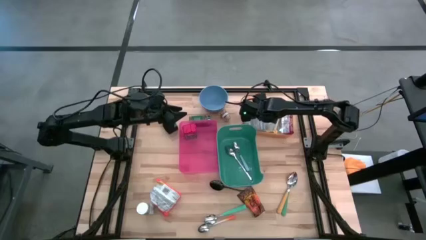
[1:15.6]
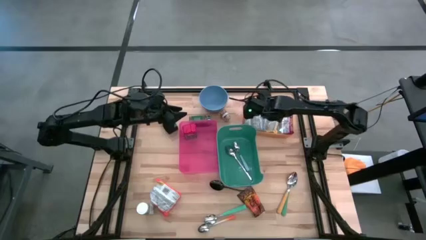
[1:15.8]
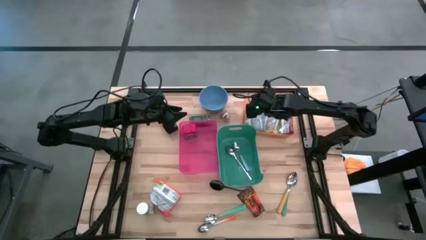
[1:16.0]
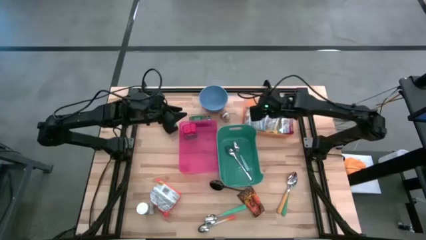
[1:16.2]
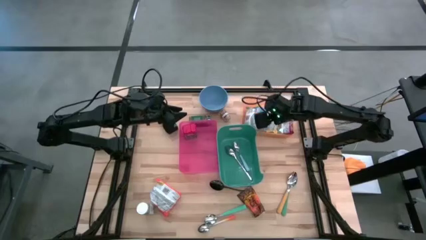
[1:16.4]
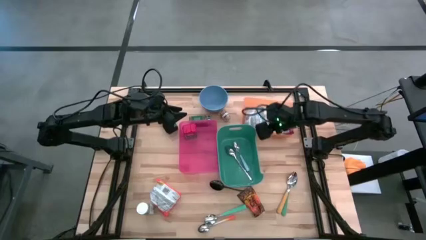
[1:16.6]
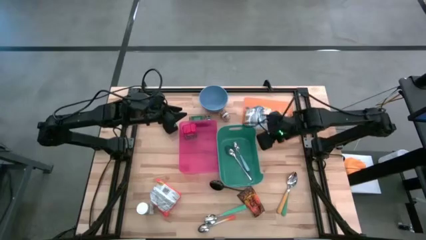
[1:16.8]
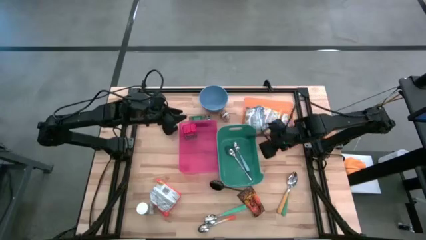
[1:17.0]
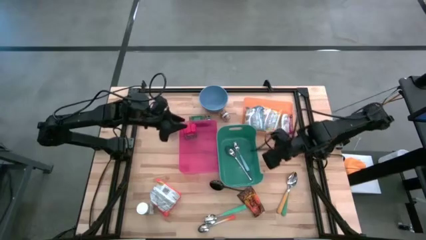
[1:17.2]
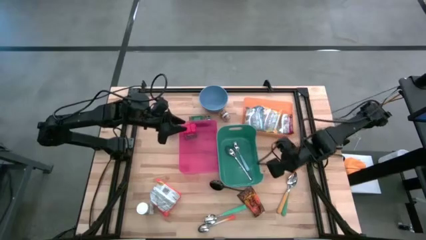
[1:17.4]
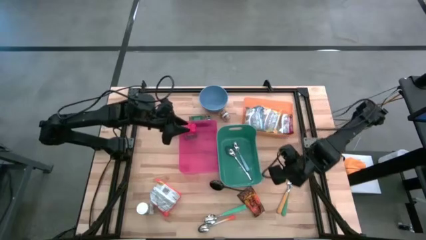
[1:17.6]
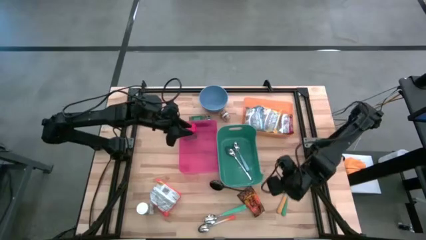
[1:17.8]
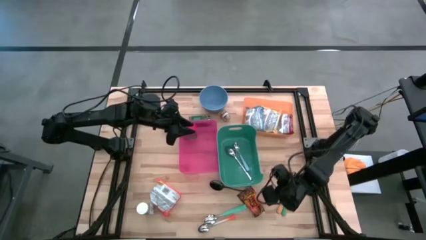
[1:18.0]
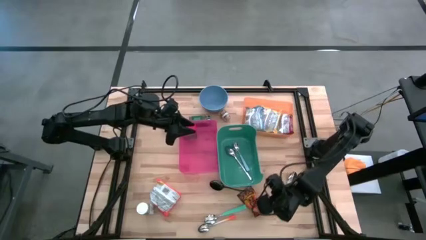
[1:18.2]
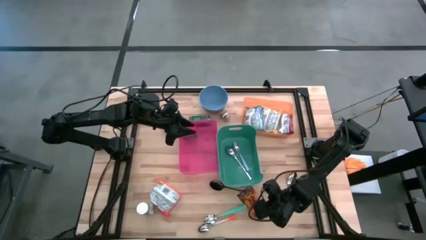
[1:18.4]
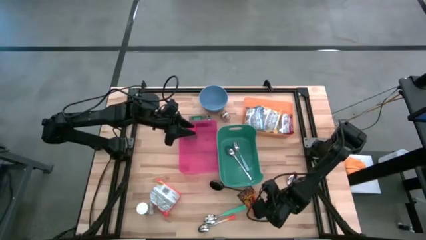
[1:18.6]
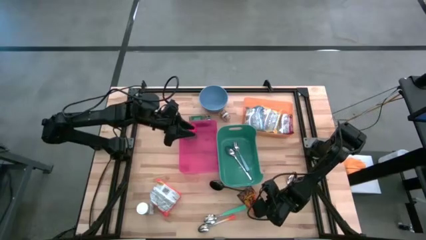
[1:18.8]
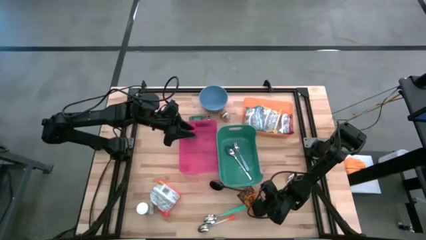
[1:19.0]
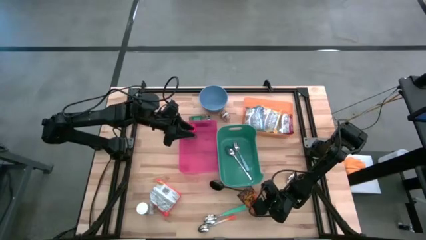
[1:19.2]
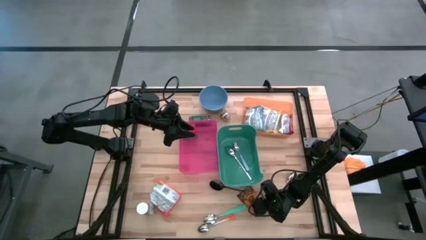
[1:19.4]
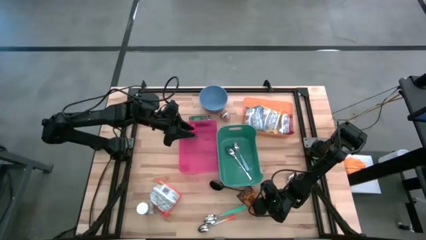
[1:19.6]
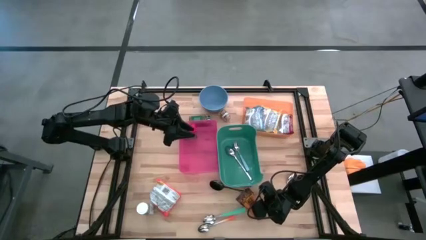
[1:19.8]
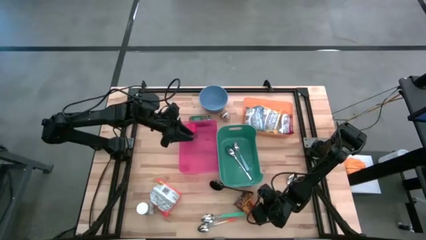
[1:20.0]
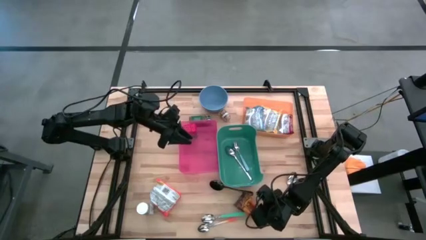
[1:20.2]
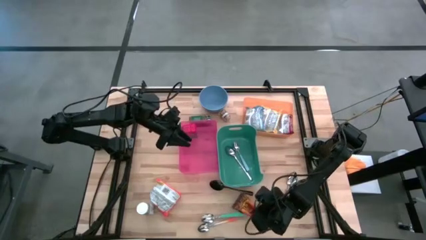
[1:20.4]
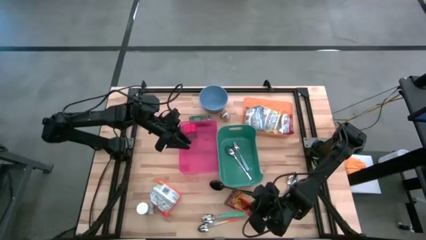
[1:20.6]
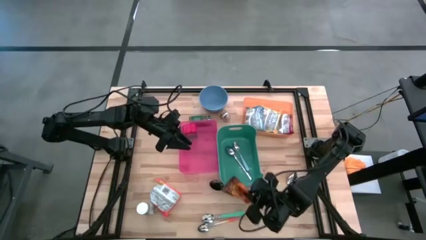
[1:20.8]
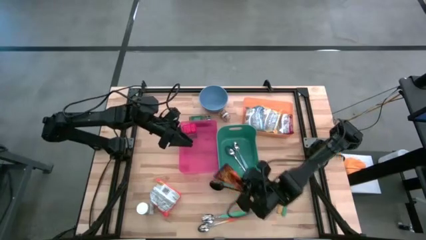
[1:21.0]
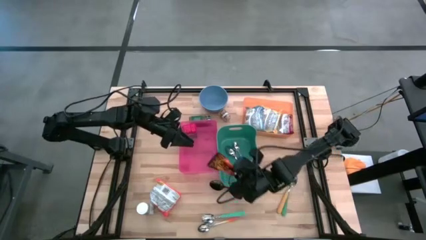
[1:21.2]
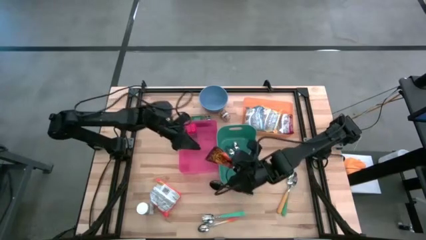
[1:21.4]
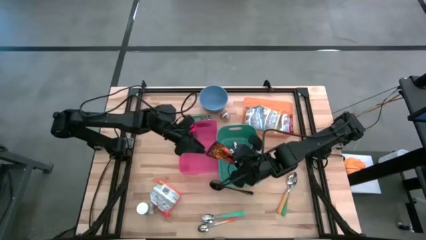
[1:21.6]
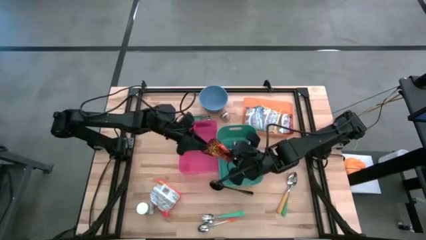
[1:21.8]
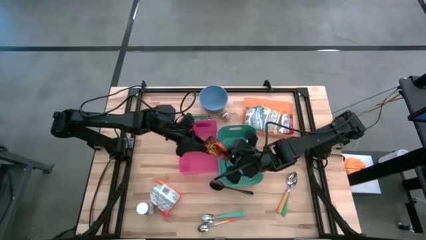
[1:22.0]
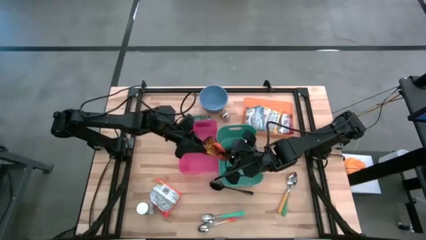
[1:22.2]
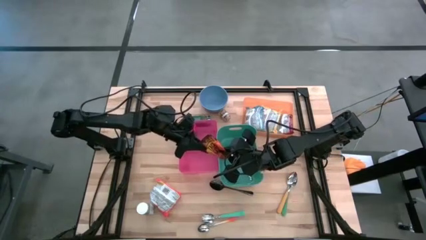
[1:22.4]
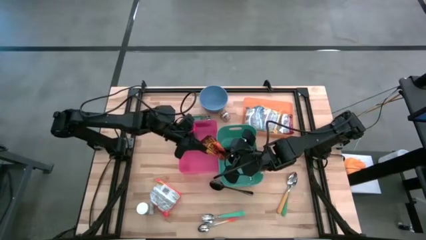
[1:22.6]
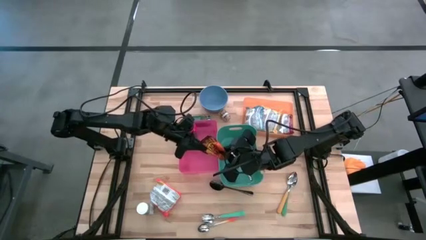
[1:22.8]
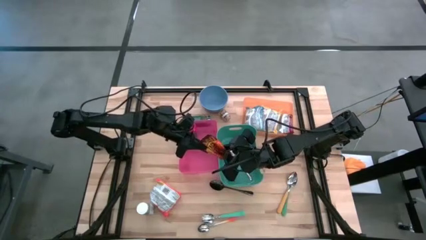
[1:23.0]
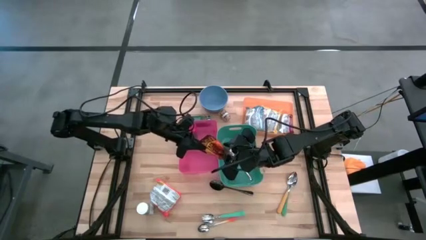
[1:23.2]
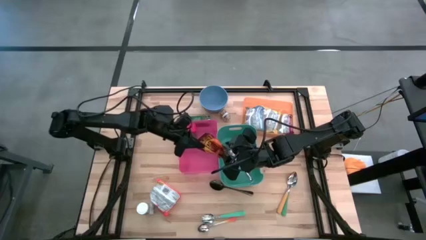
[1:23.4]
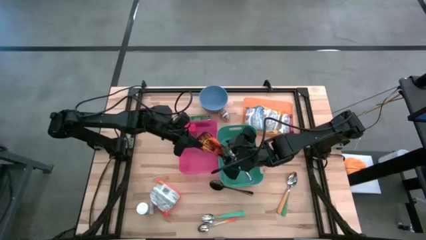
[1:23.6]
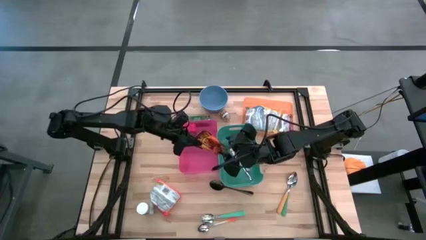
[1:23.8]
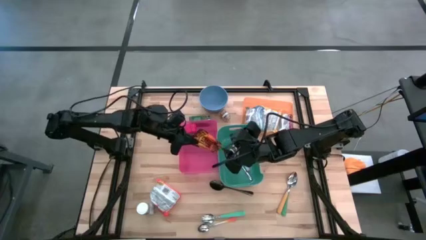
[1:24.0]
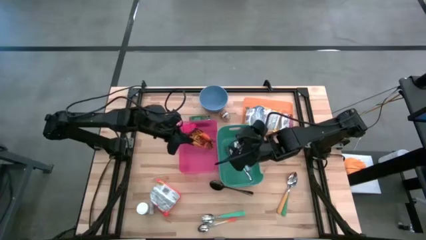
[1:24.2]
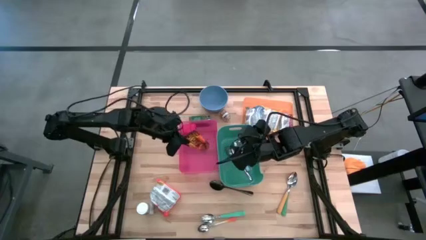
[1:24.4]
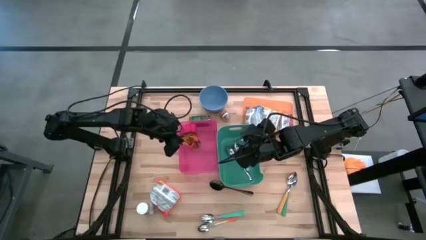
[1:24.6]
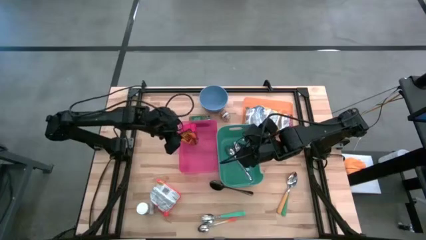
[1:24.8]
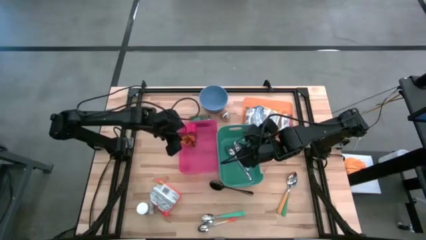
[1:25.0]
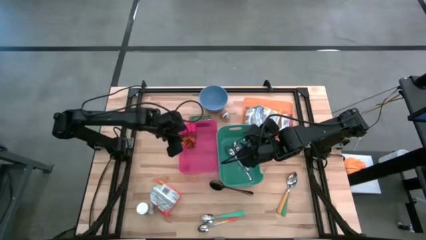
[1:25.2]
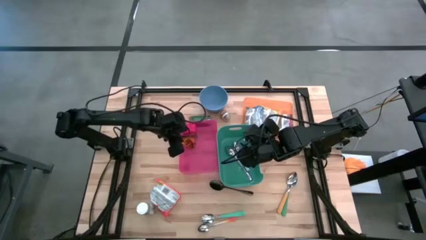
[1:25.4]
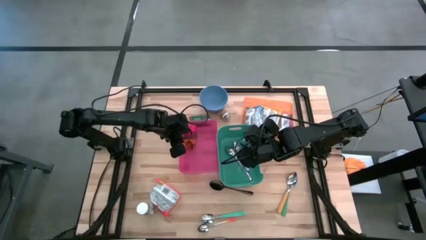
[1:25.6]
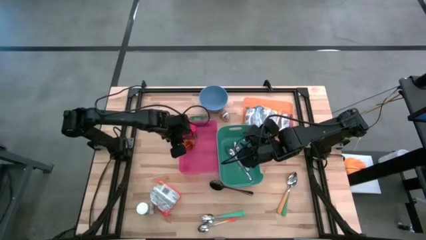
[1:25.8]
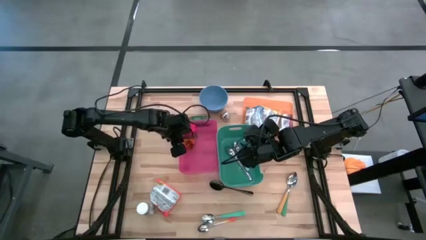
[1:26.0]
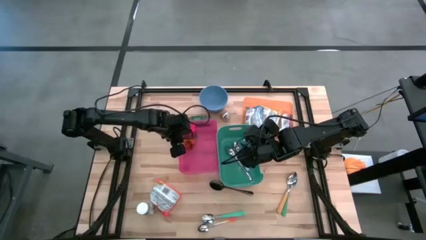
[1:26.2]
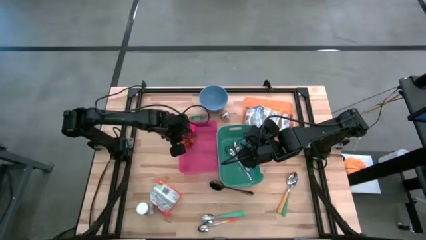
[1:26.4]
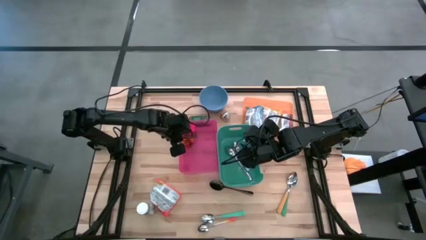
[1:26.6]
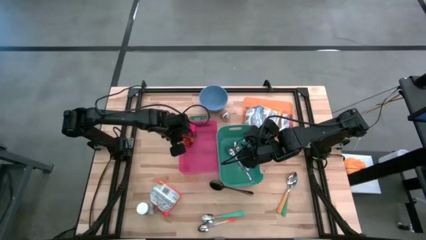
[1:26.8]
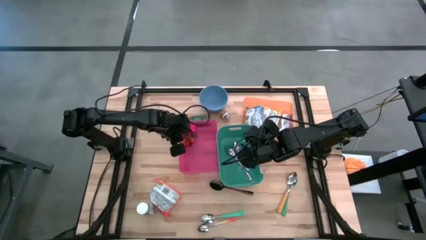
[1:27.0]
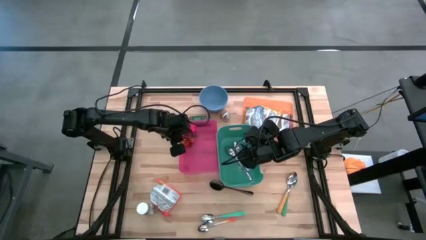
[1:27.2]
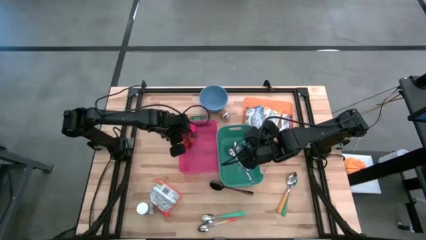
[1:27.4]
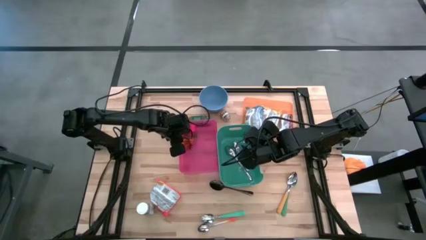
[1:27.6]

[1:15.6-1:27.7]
Put the orange spice bag into the red bin

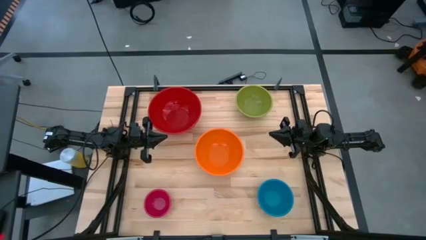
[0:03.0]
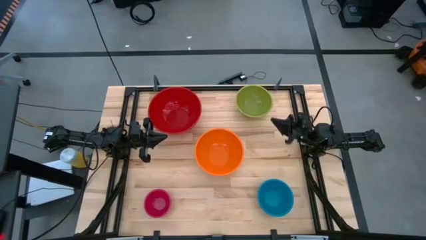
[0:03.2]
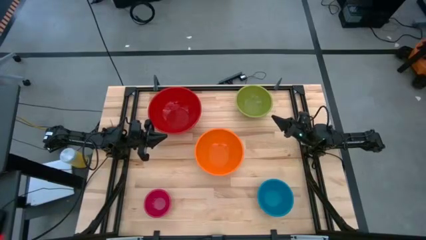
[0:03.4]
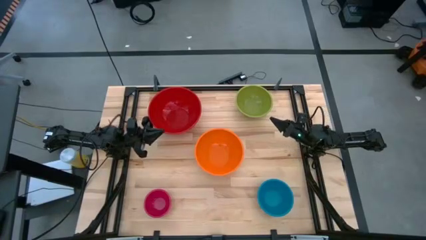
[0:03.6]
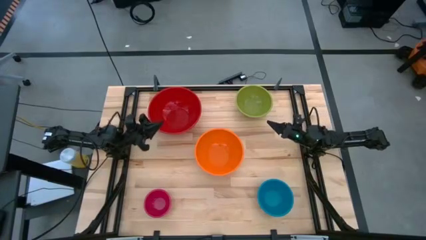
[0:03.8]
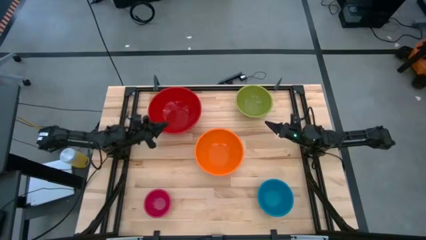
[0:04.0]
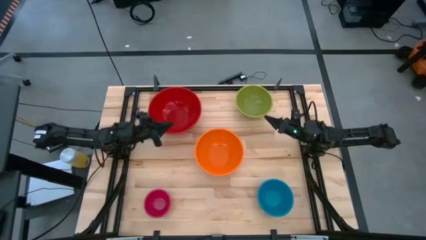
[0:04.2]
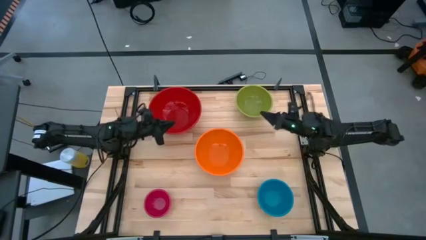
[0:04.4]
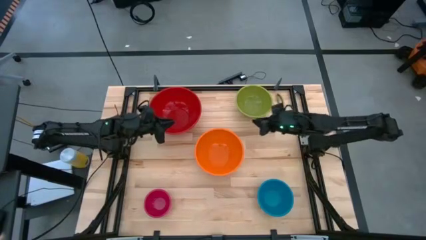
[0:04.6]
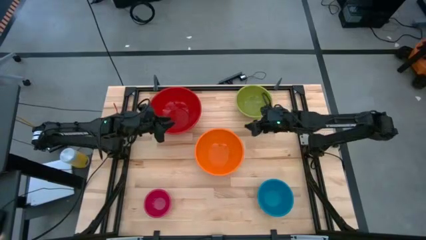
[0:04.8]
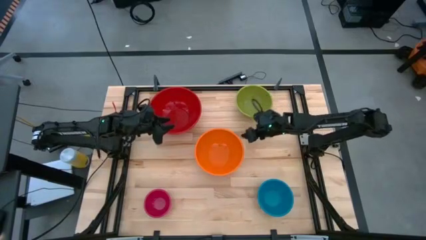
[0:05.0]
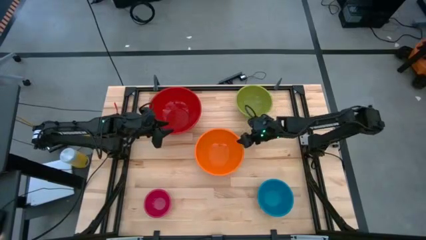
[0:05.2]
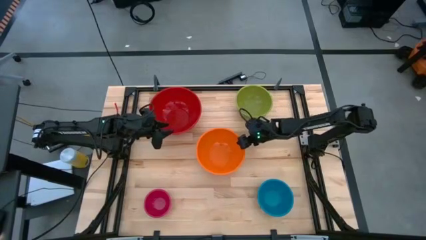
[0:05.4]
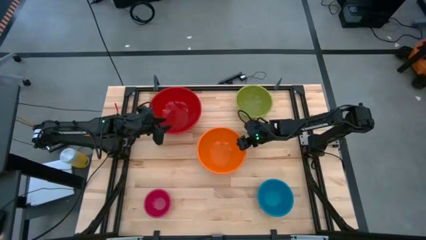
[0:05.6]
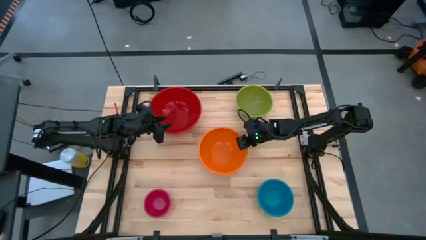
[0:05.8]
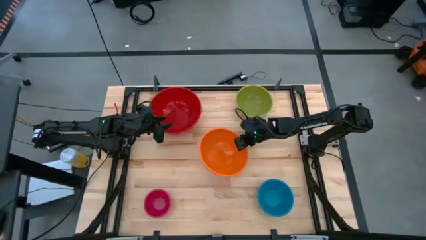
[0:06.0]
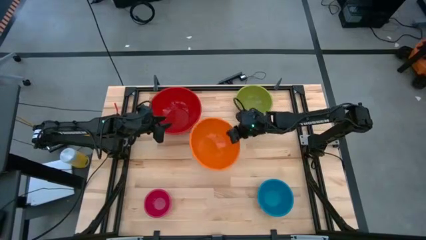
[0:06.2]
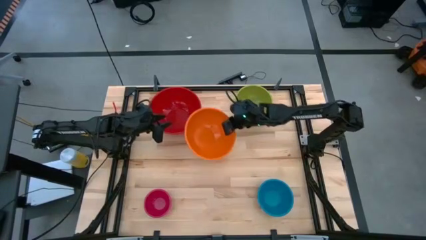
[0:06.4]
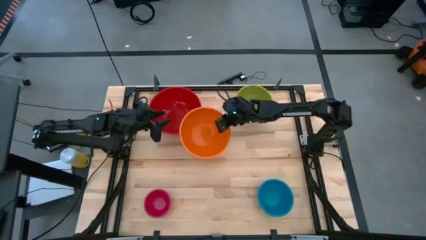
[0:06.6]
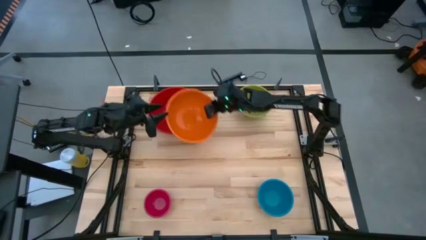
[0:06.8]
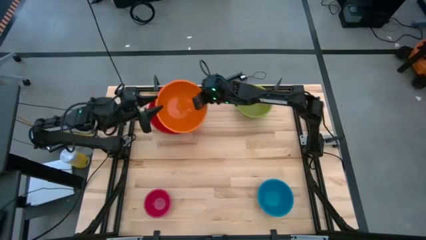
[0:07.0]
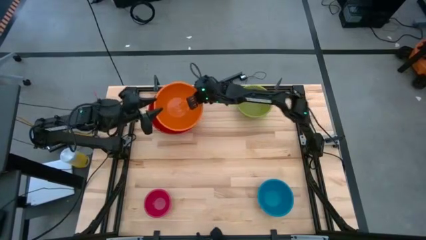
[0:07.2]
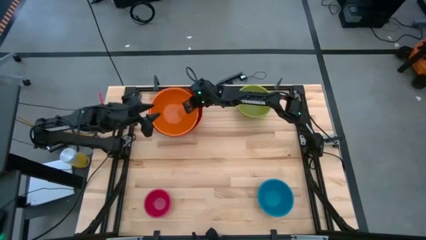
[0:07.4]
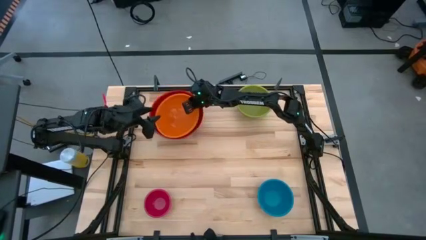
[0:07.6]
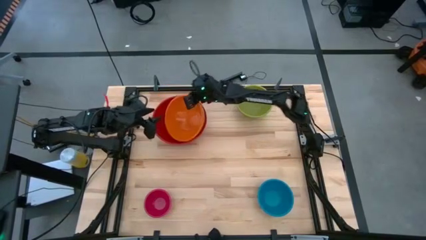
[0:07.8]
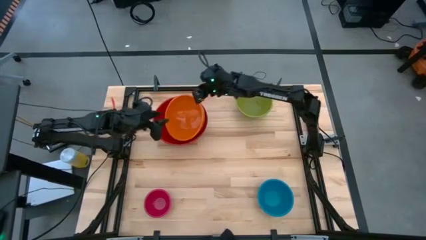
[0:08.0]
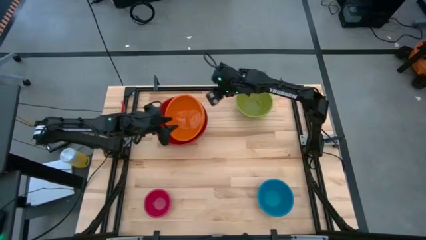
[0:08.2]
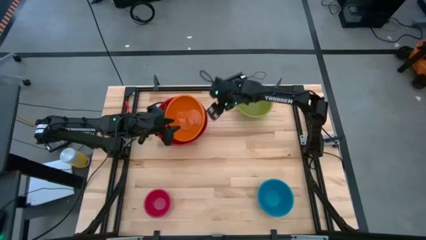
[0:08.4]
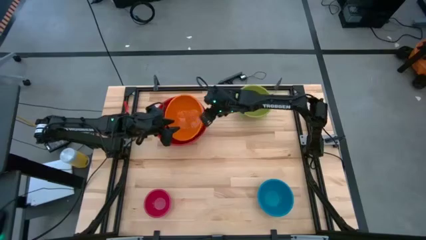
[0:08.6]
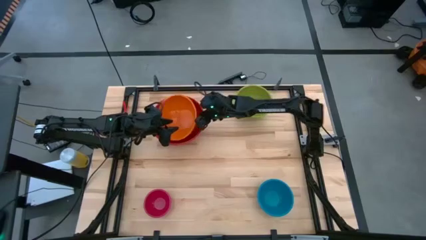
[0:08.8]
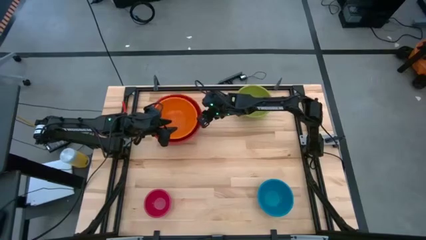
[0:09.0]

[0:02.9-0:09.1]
Stack the orange bowl on top of the red bowl
